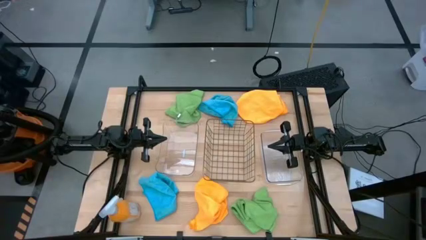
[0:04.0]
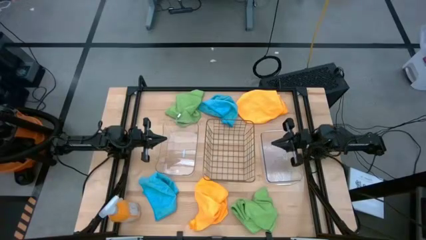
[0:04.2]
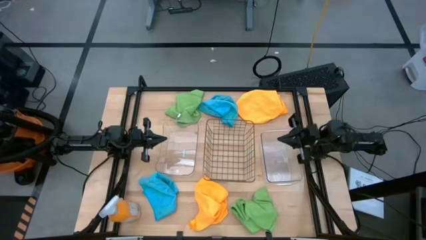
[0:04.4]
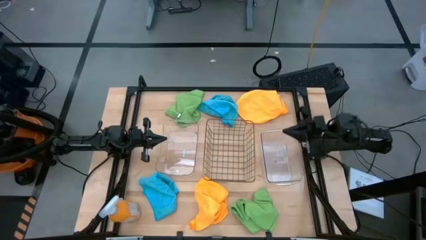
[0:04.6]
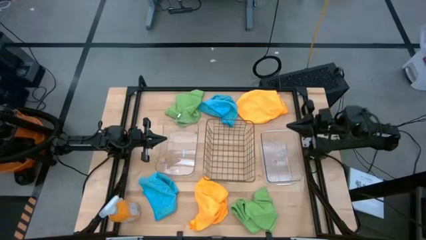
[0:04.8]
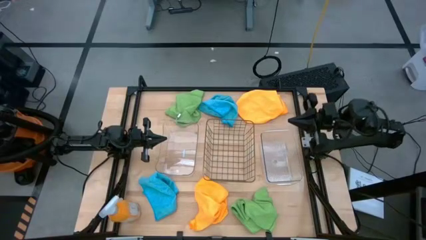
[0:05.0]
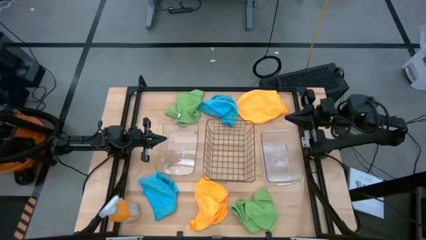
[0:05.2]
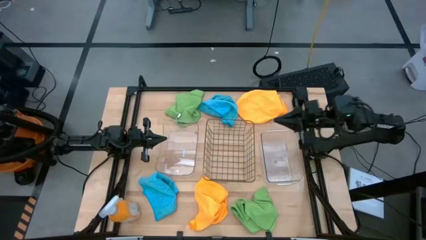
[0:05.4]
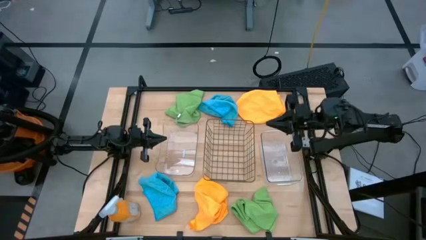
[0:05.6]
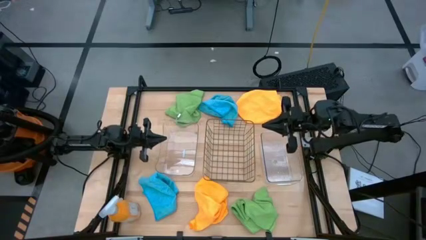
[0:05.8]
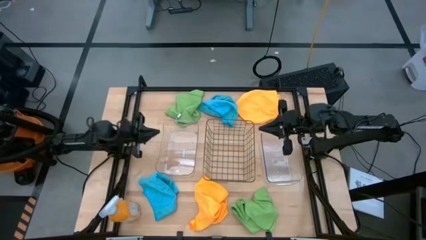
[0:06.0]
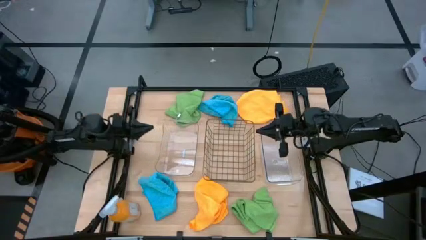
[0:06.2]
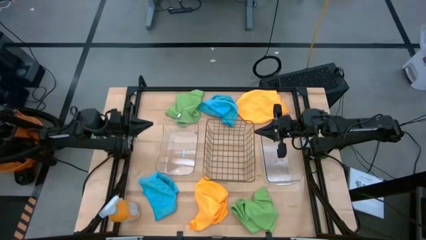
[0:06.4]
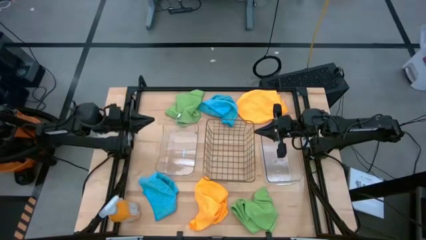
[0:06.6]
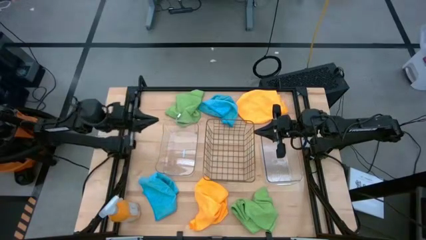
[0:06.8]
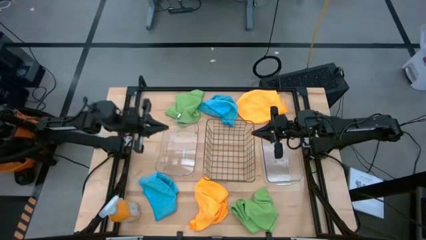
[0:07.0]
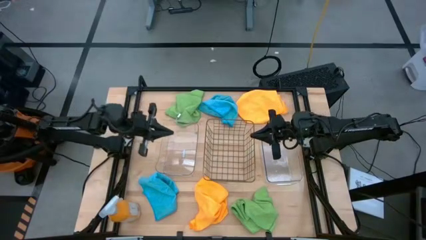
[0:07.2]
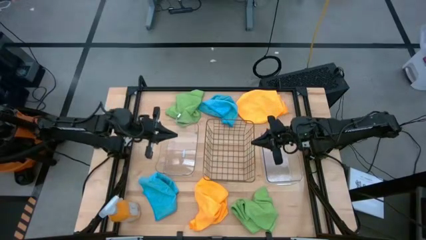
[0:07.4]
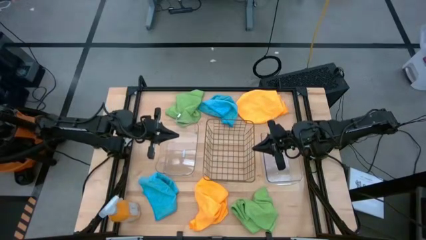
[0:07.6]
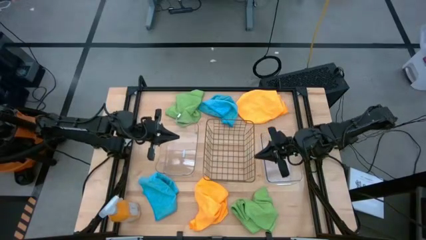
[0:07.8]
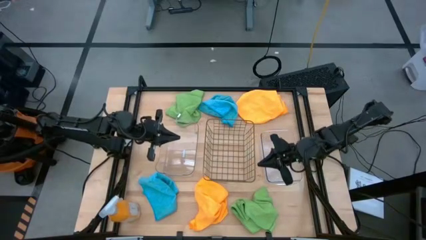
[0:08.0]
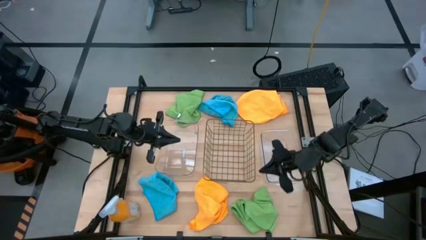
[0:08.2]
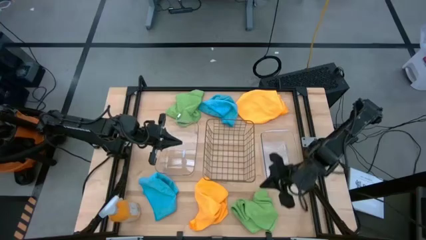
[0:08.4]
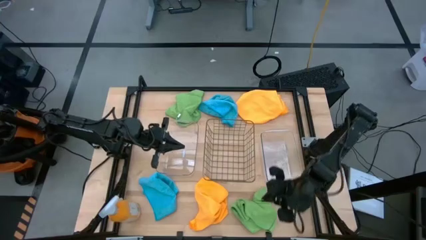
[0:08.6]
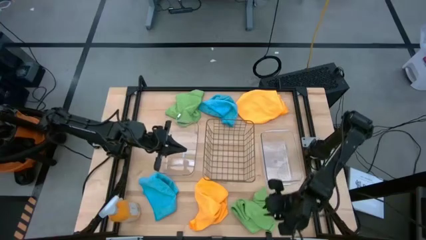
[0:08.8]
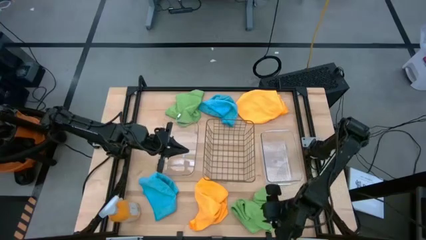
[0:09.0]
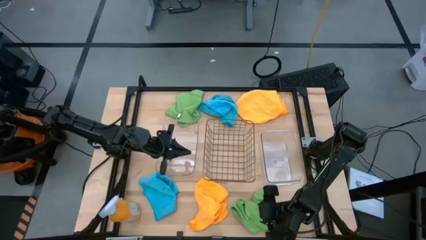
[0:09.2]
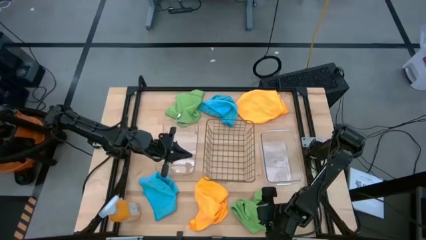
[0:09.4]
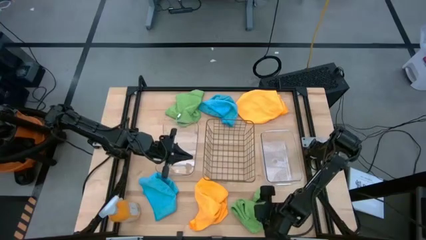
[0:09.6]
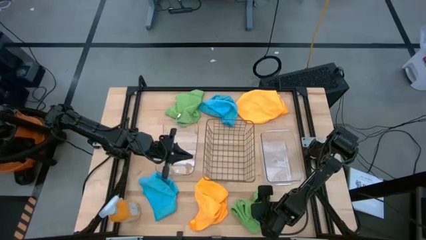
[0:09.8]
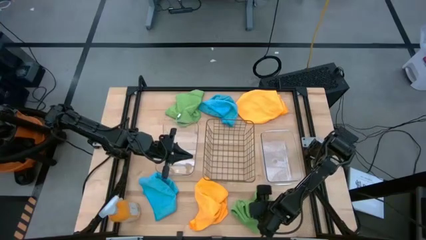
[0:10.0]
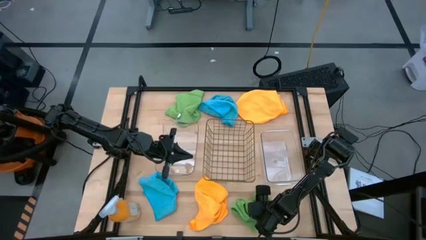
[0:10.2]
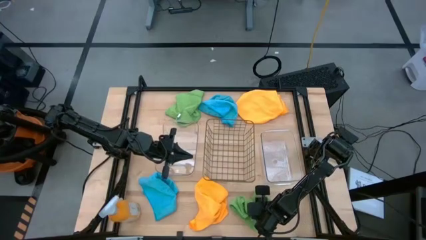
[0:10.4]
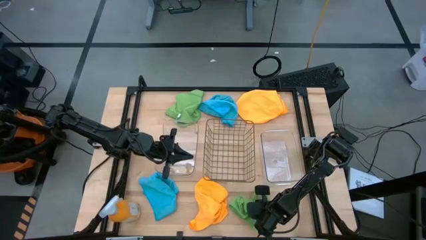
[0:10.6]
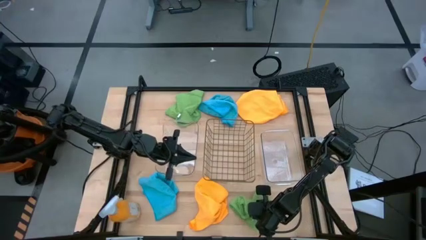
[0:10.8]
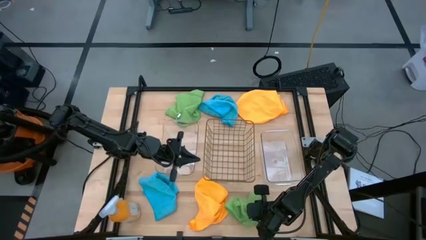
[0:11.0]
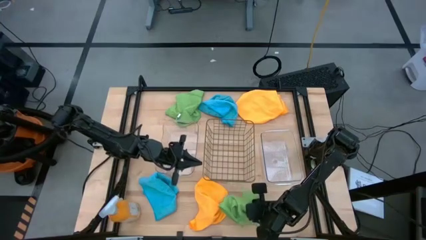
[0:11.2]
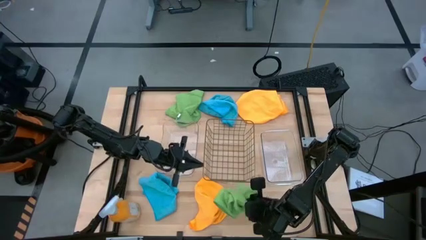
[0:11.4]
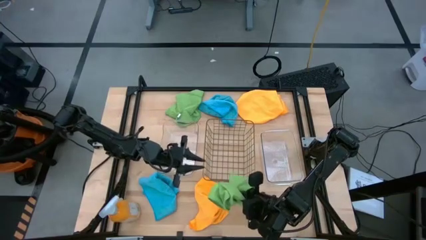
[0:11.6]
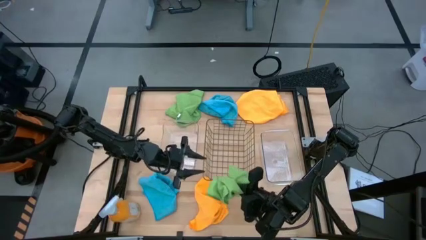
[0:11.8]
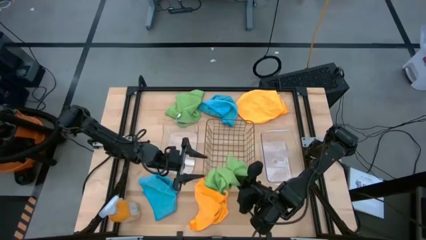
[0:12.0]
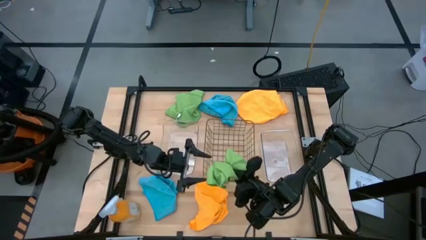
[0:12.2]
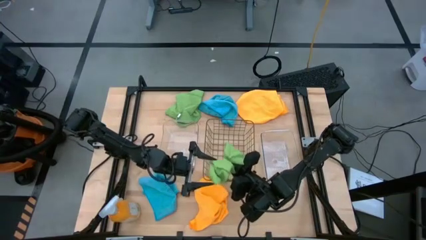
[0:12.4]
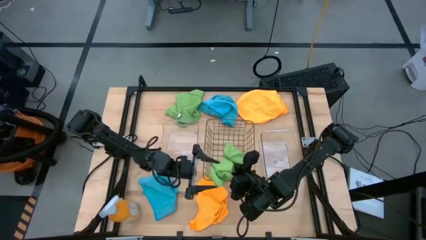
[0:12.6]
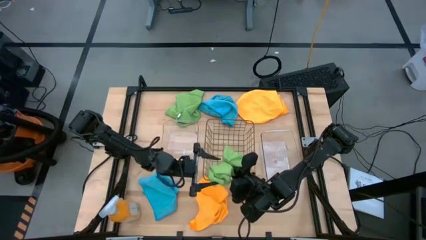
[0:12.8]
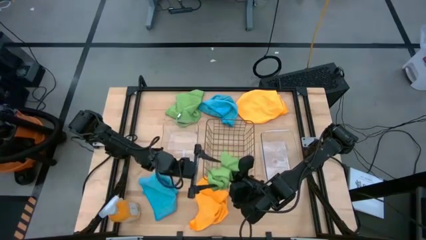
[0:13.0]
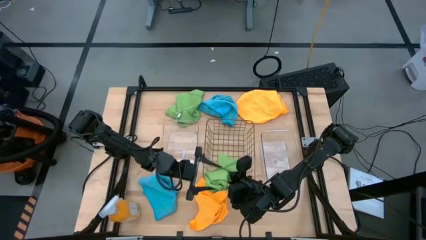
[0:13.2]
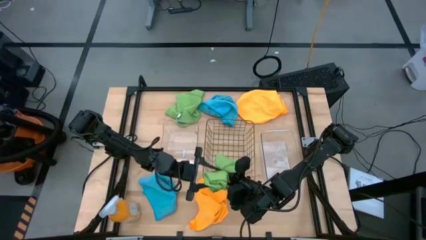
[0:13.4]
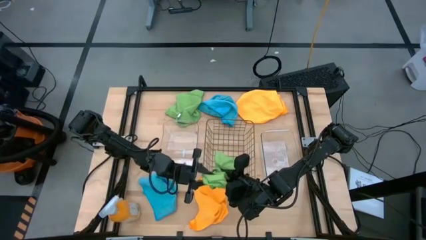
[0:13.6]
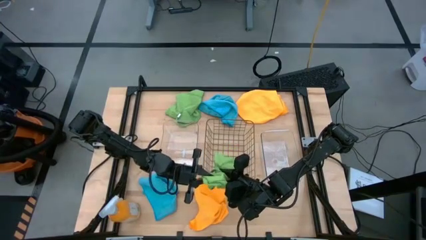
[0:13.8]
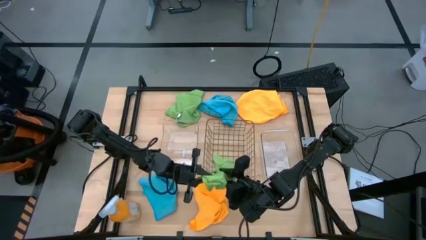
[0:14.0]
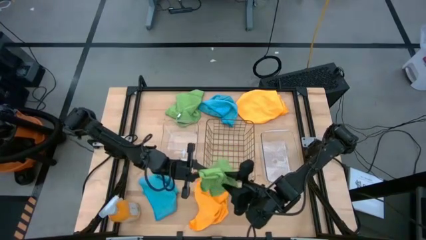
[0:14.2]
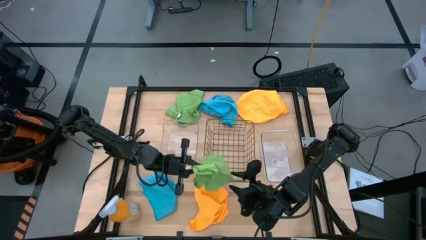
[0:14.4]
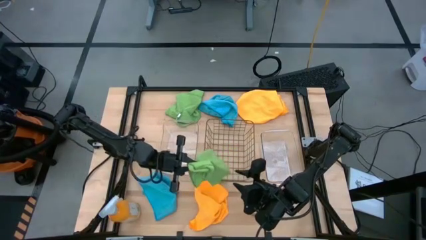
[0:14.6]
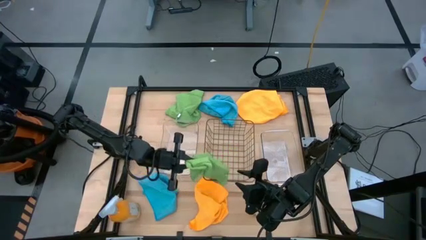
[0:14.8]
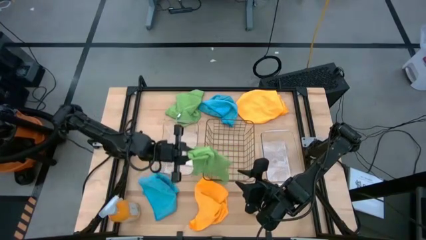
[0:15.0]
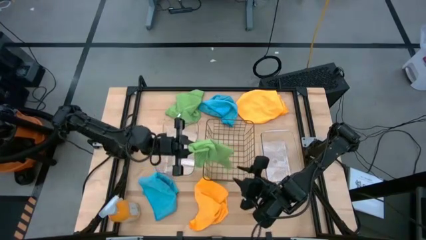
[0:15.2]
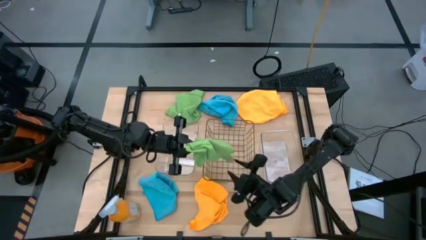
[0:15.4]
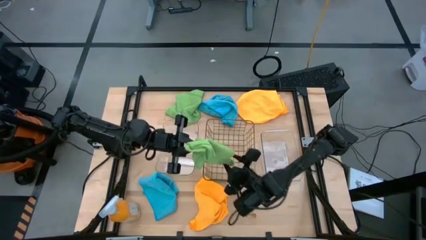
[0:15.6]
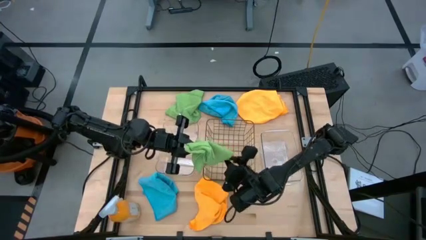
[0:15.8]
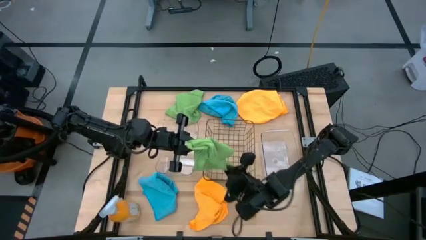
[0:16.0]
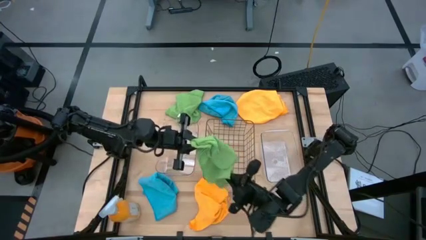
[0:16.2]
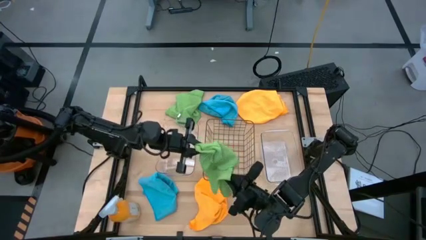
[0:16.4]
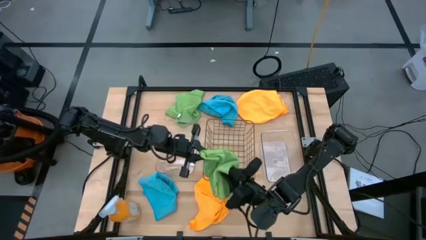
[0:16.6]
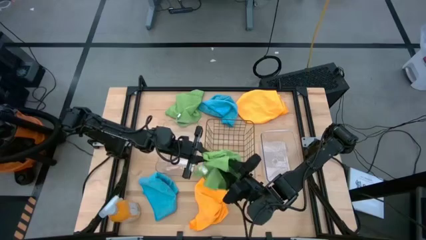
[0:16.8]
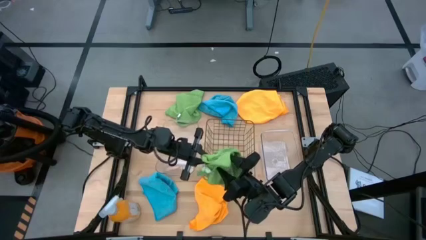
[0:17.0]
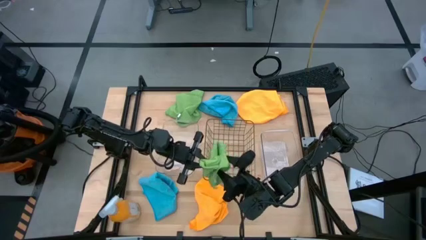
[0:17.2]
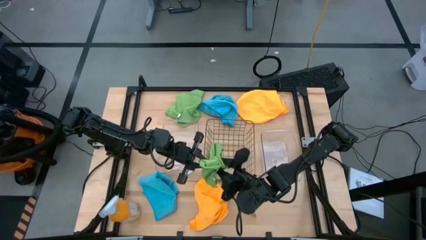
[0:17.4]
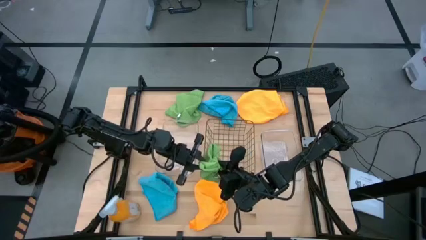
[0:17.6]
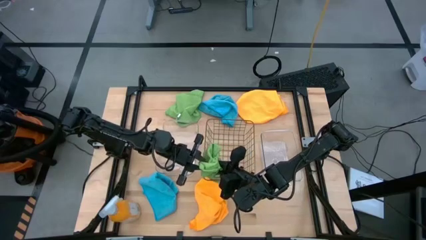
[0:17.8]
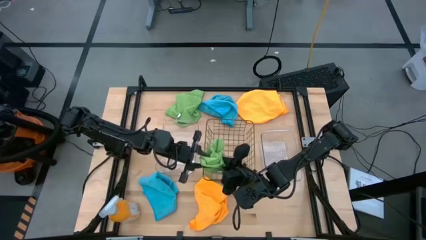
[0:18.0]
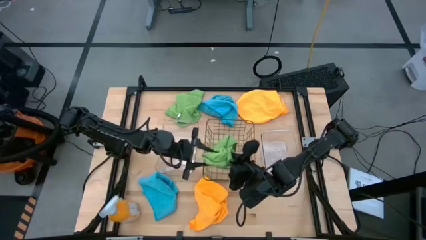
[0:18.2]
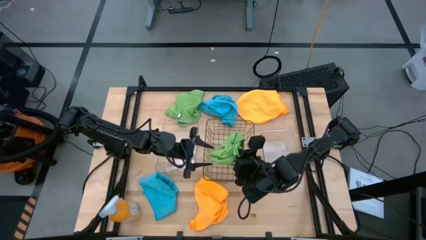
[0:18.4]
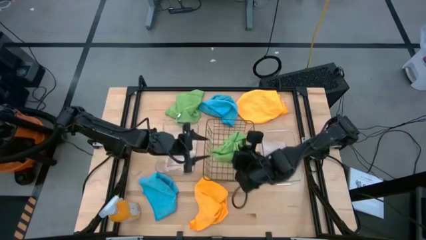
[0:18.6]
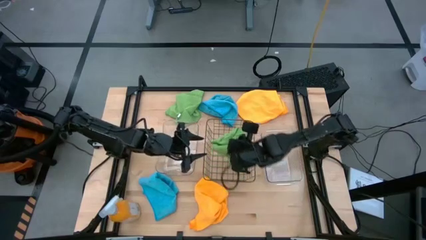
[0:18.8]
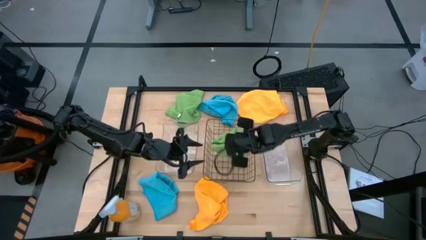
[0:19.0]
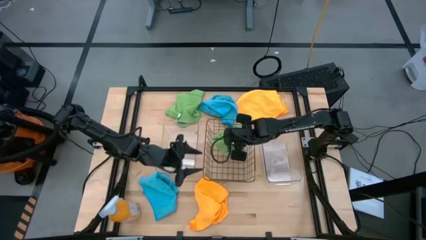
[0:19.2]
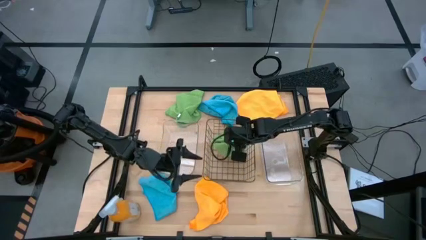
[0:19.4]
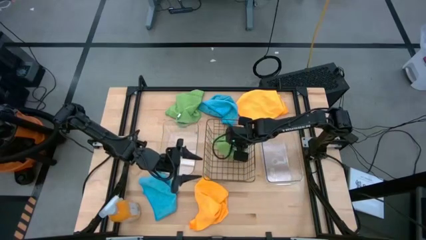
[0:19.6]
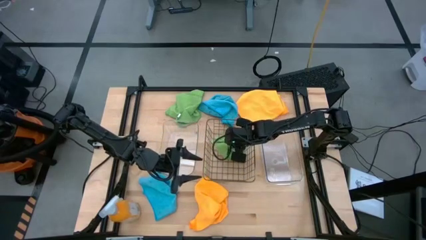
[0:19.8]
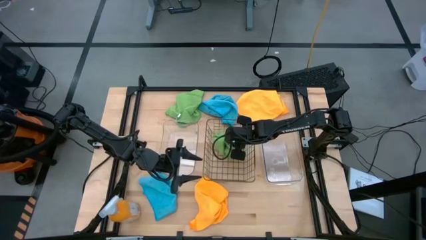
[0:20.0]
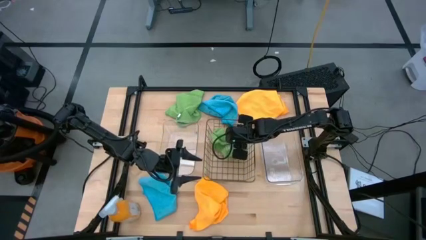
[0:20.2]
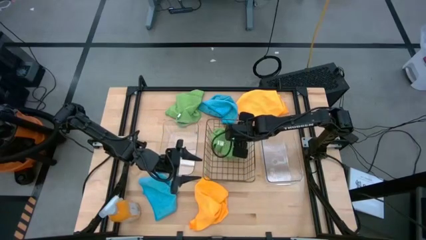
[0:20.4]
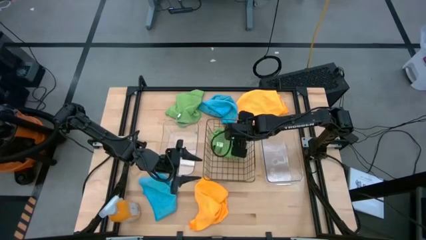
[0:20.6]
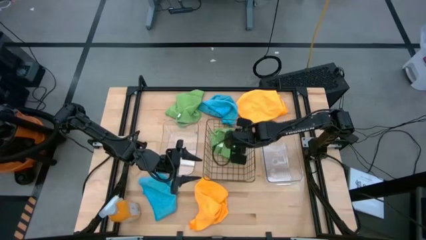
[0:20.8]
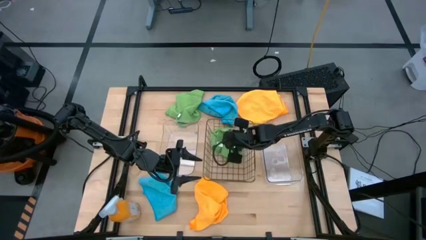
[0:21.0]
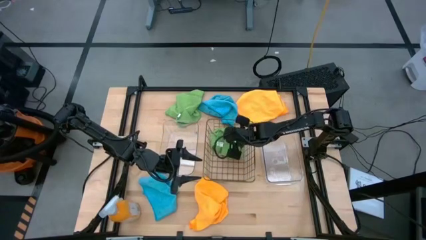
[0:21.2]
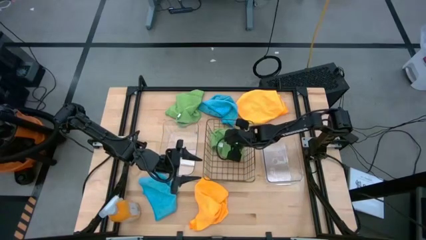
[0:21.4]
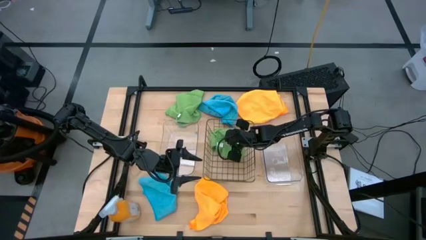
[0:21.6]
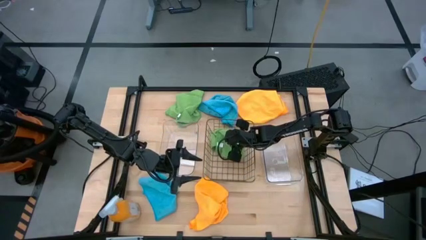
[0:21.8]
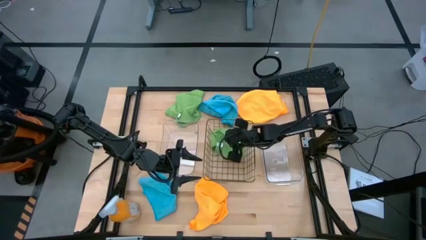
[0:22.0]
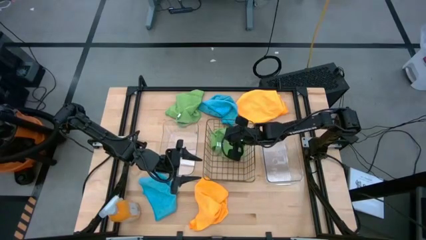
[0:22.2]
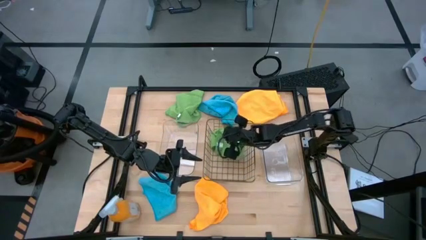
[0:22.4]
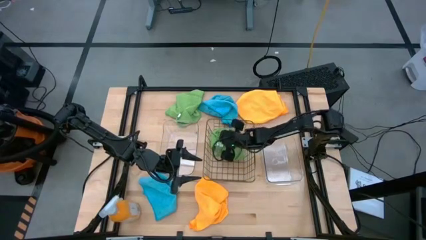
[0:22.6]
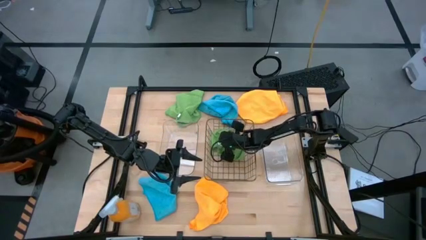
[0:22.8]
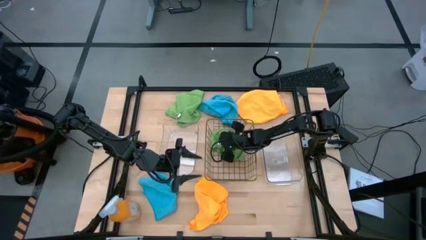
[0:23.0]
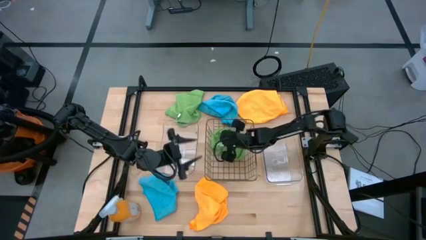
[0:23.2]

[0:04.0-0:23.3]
Task: Sort microfiber towel by color & place in baskets
Put the bottom green microfiber towel into the wire basket
